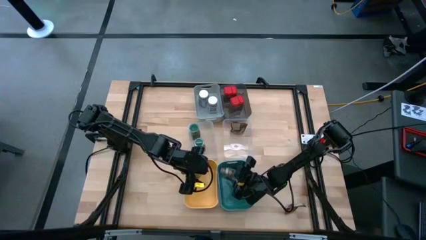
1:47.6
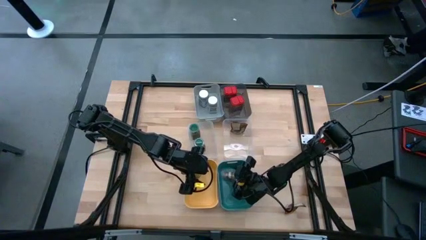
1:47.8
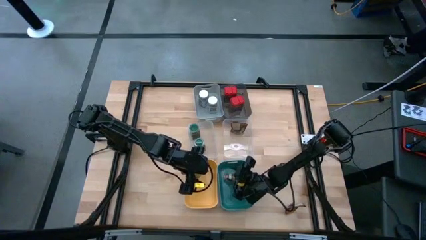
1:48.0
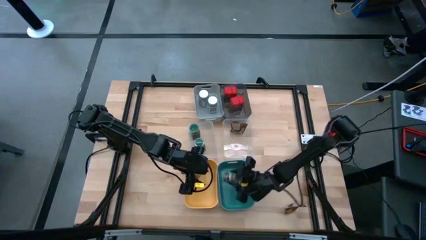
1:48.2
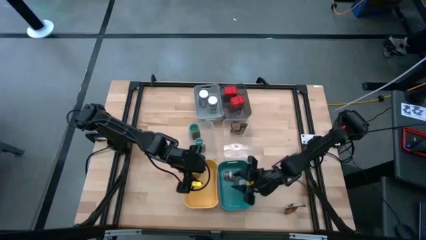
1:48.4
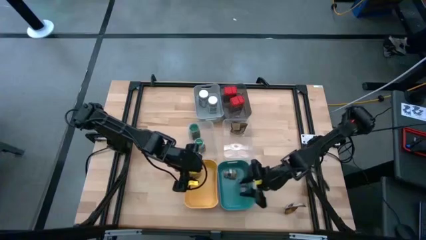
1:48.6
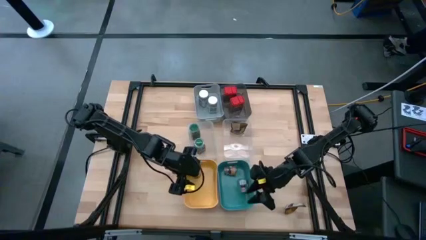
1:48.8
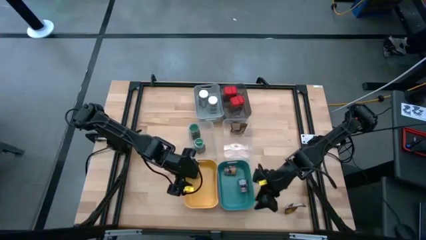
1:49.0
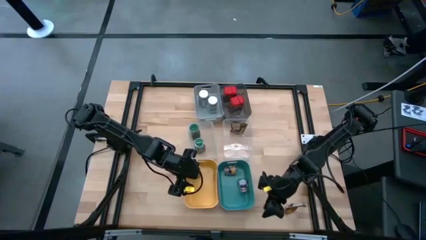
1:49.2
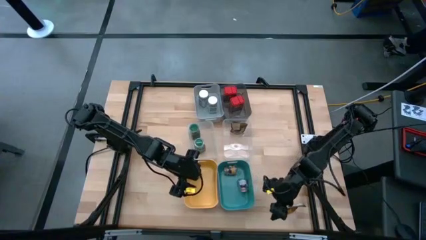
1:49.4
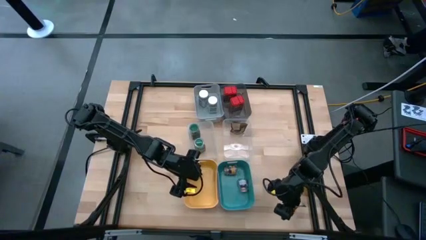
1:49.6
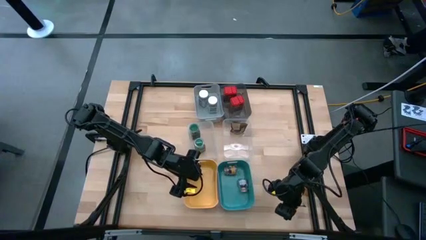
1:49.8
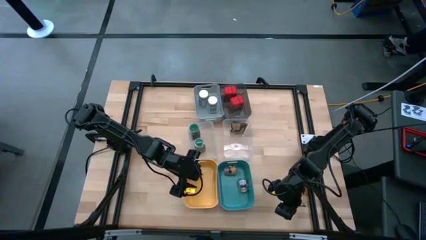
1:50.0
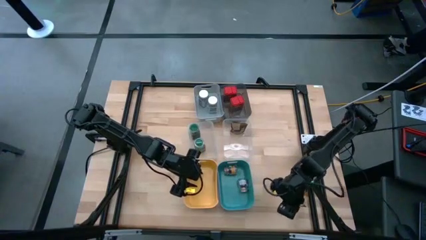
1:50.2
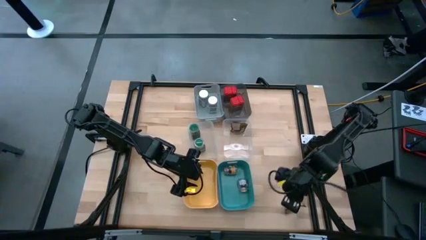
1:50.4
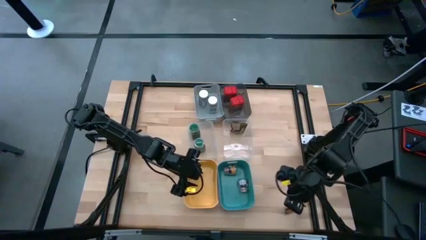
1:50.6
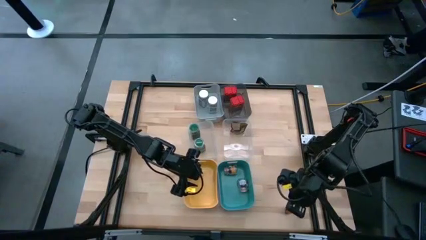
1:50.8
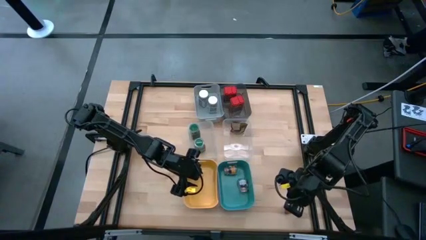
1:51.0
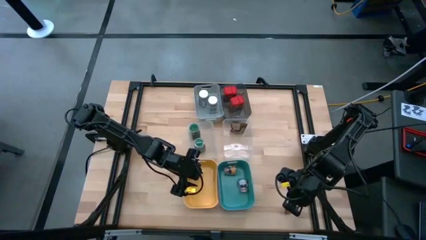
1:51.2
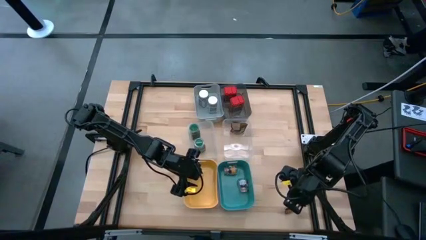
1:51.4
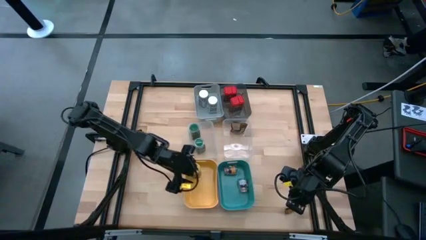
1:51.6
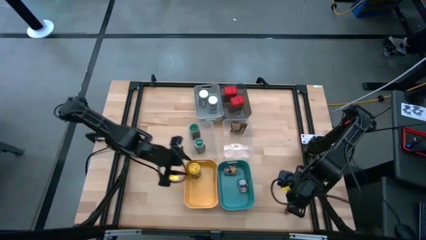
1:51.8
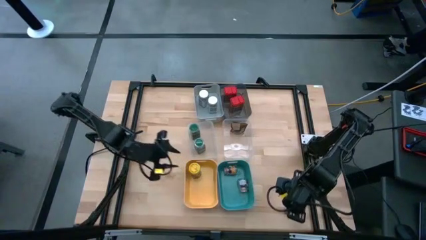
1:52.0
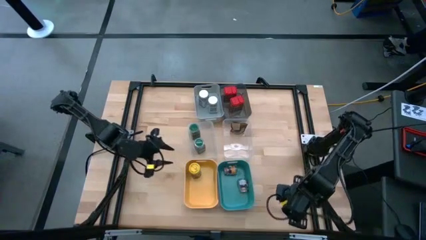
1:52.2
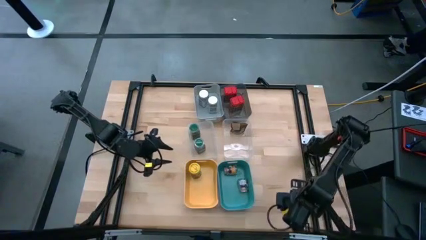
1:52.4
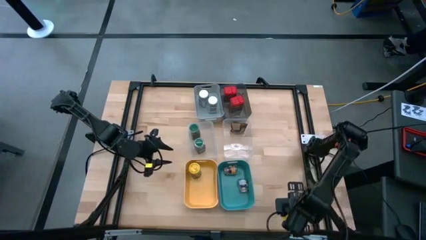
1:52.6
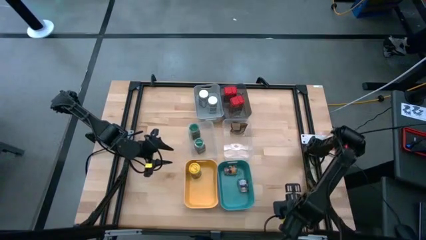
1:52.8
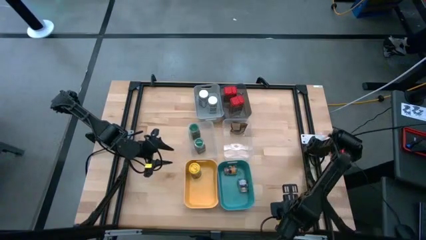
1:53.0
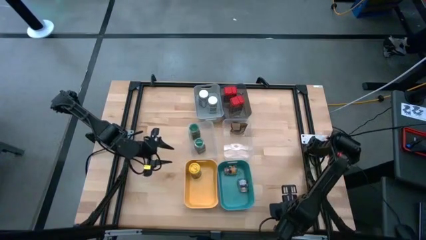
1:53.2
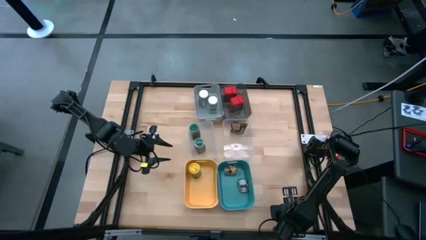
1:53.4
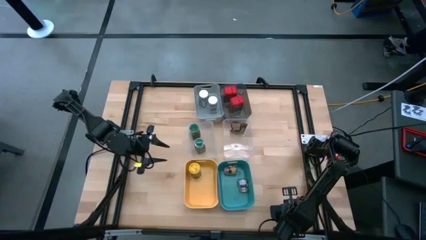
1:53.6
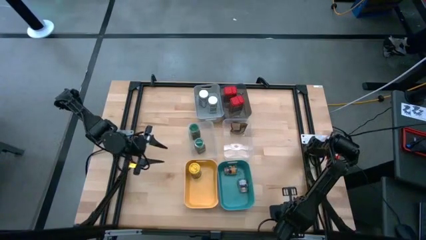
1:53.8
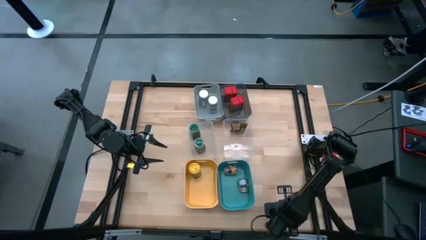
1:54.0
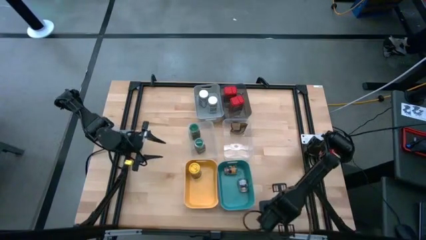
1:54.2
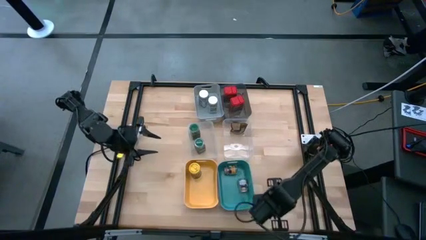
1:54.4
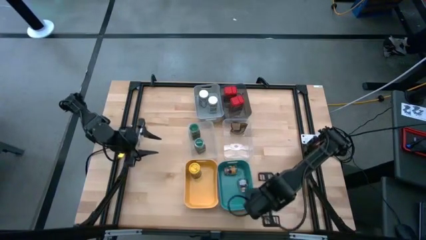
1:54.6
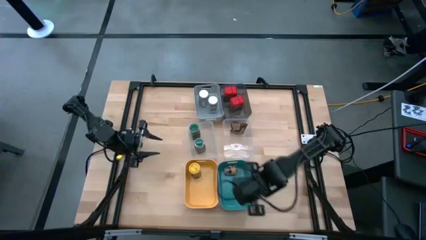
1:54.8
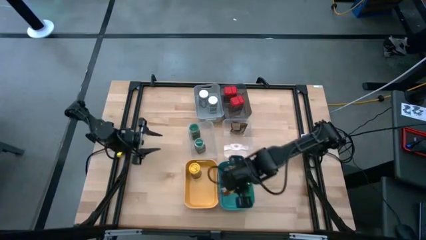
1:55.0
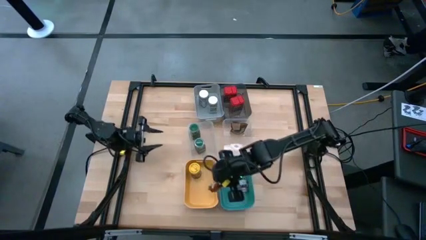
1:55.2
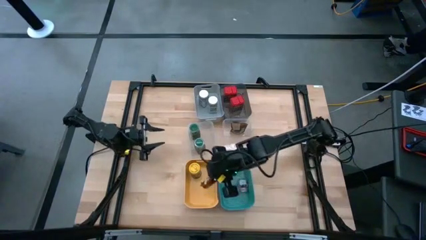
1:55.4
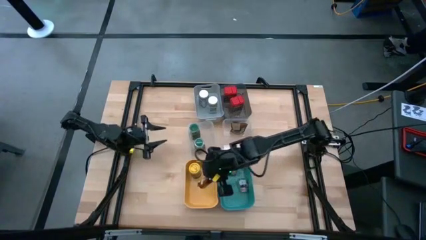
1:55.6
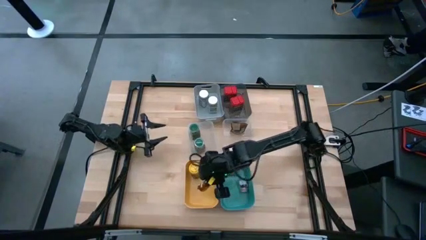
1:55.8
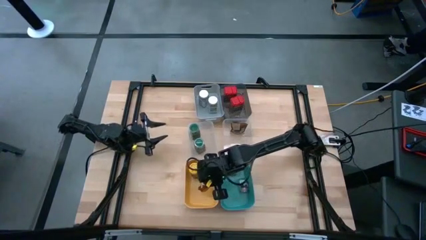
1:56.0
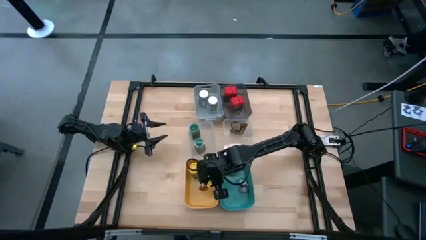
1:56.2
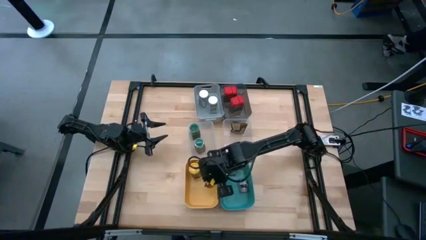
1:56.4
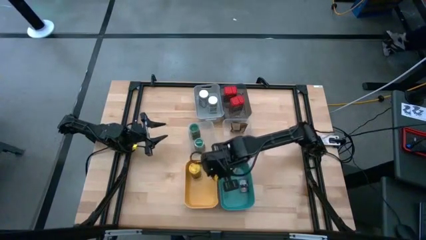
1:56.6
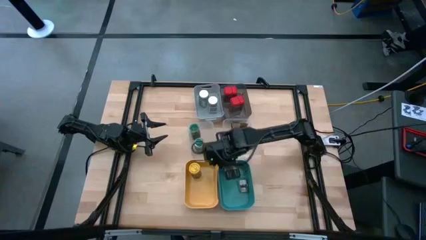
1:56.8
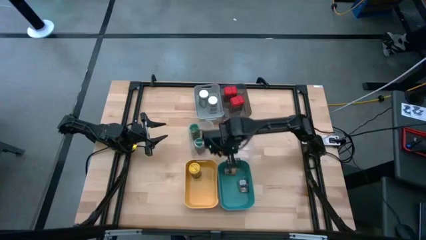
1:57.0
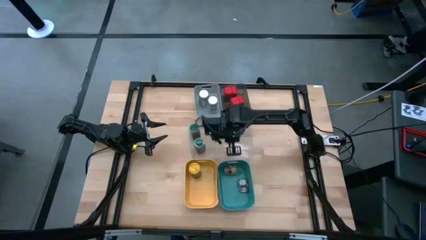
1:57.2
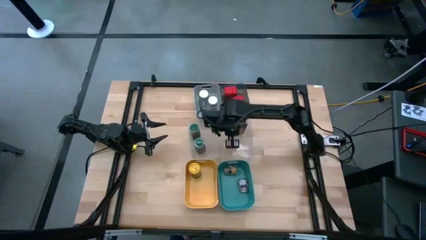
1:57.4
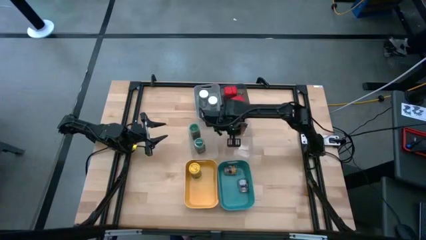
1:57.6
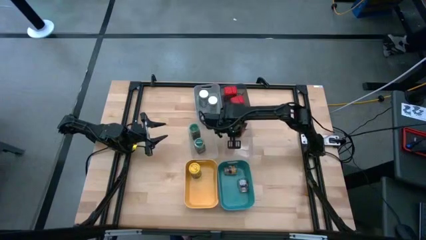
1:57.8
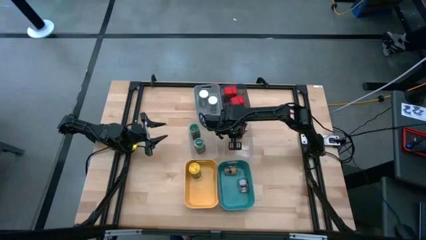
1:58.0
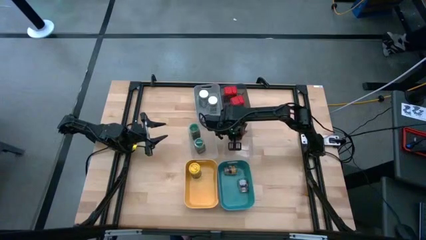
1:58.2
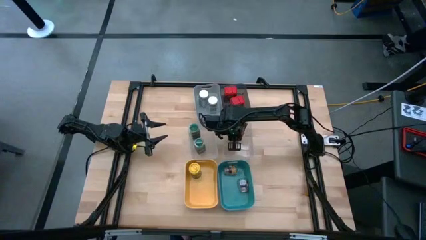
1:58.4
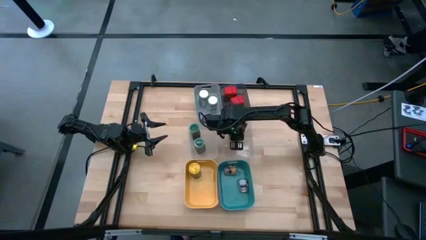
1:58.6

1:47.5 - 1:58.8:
Task: Sort spices by type
Put the orange seasoning pack into the right transparent bin

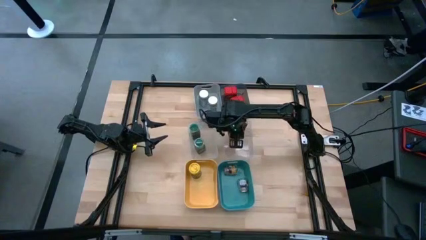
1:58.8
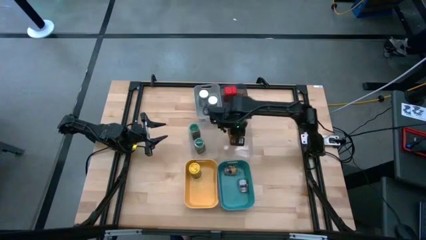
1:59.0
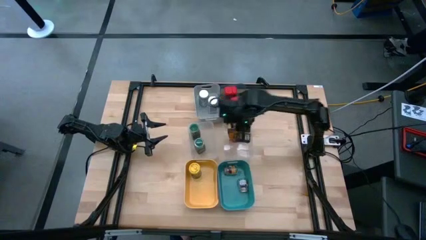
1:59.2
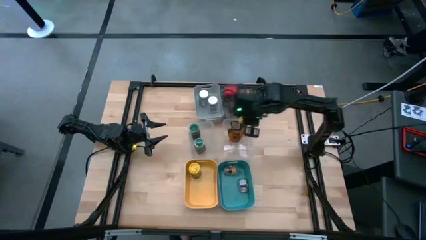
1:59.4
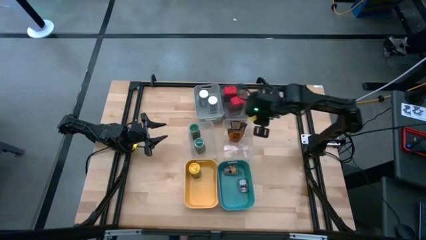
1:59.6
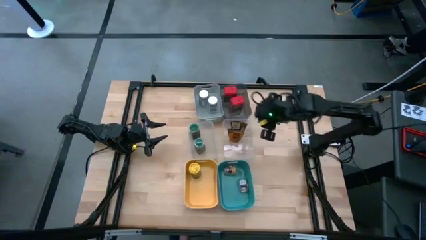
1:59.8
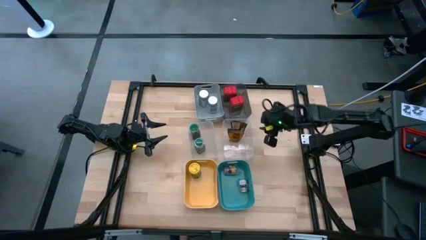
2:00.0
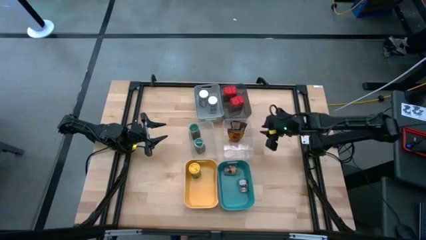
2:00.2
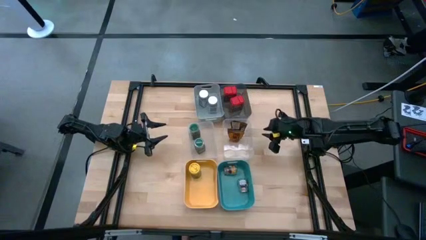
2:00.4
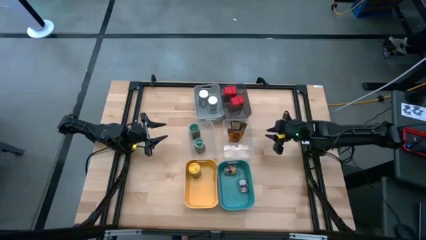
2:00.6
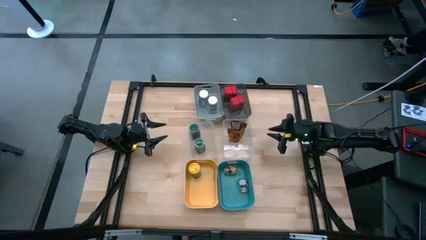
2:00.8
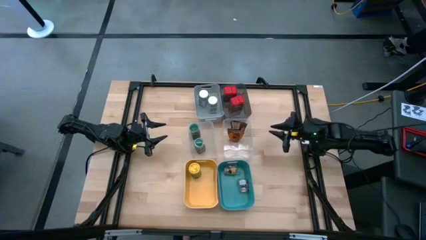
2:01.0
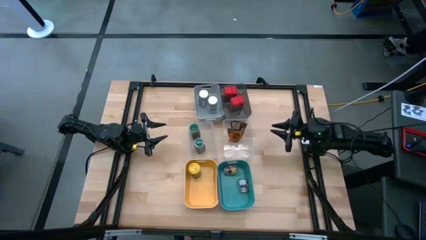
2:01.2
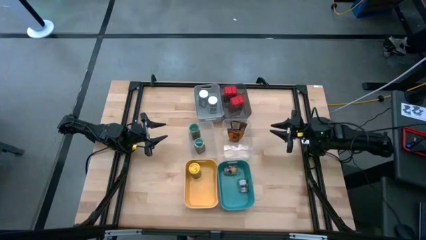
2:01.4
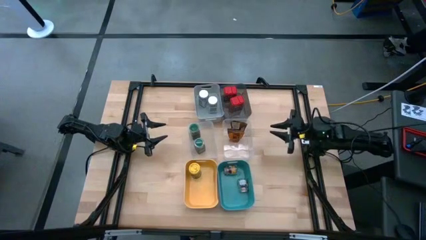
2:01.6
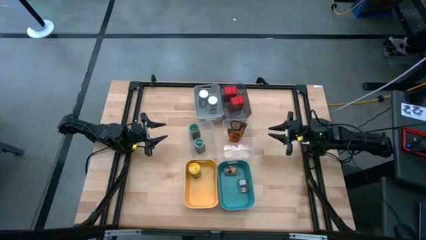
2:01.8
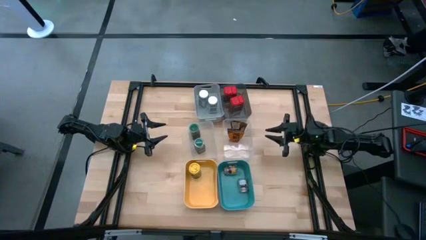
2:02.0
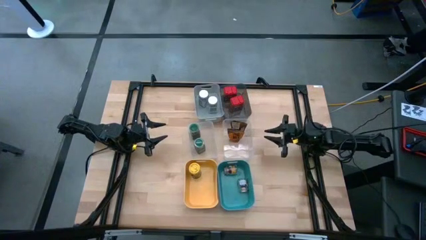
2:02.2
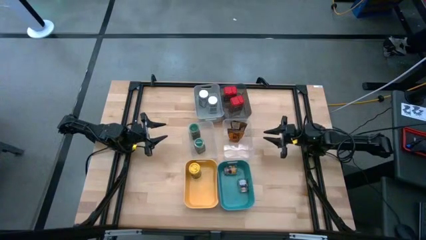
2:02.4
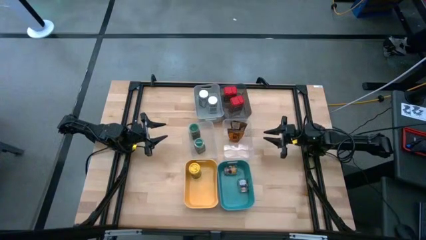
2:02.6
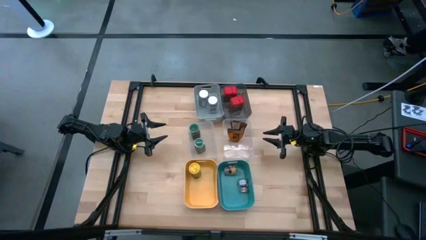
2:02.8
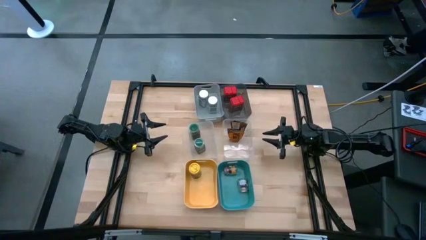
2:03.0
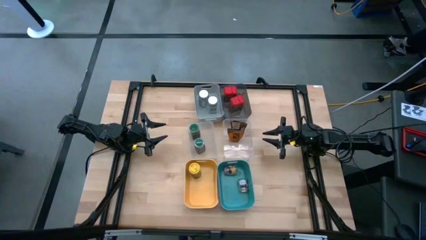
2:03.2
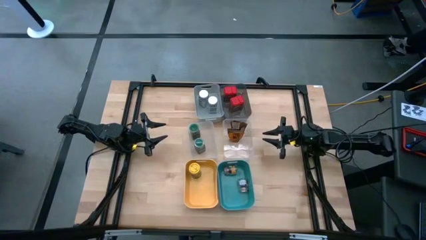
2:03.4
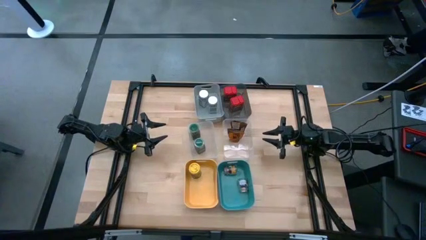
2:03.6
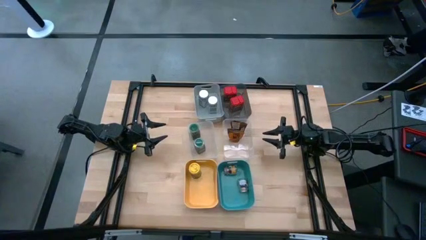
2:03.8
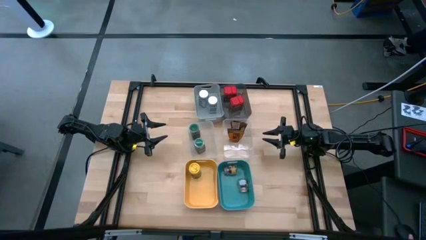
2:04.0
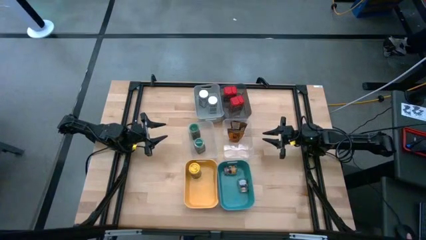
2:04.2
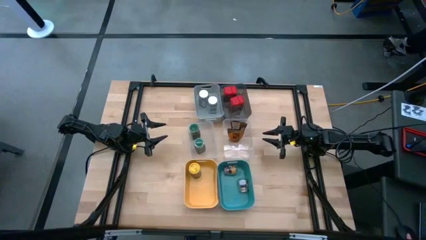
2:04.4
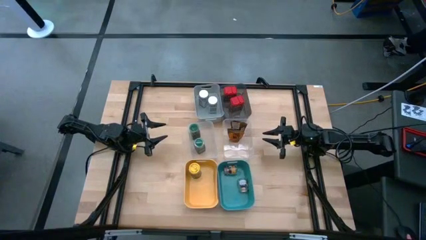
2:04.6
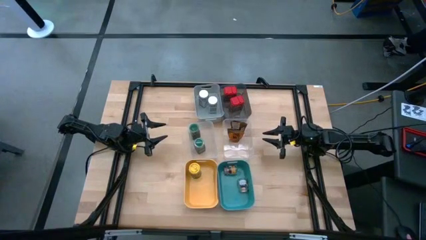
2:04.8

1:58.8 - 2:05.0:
Return to Home Position
